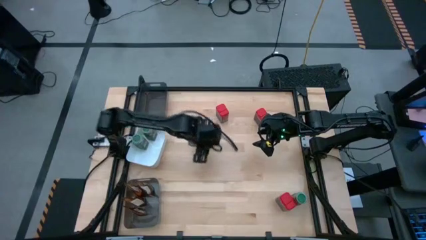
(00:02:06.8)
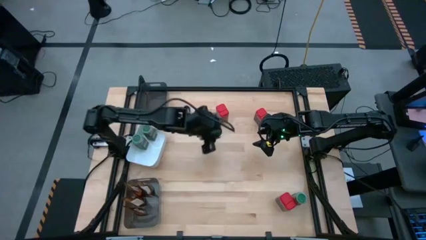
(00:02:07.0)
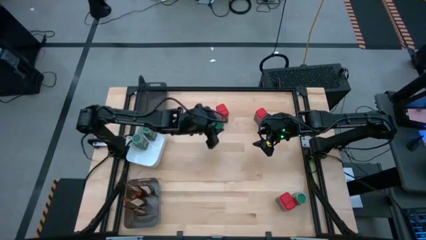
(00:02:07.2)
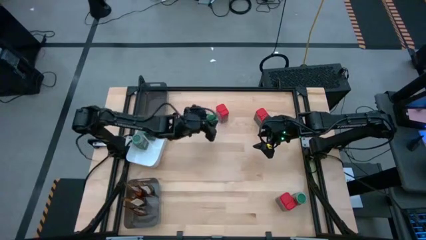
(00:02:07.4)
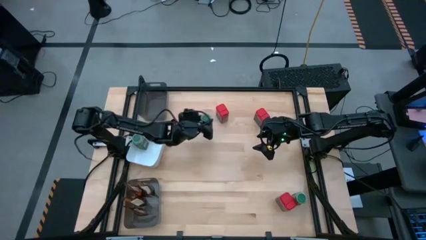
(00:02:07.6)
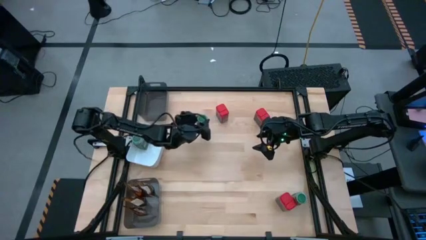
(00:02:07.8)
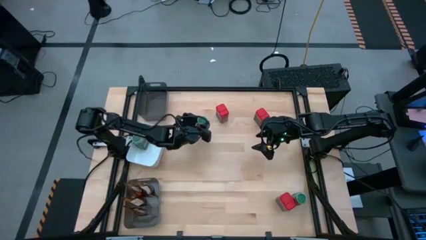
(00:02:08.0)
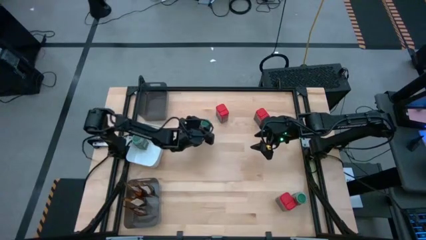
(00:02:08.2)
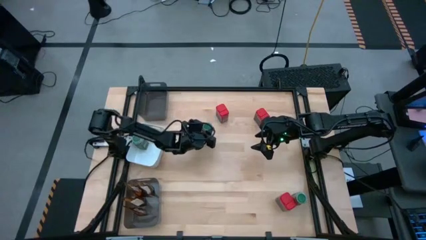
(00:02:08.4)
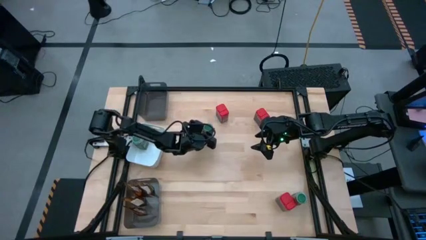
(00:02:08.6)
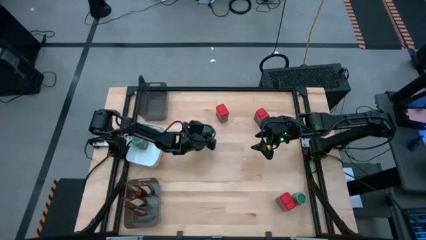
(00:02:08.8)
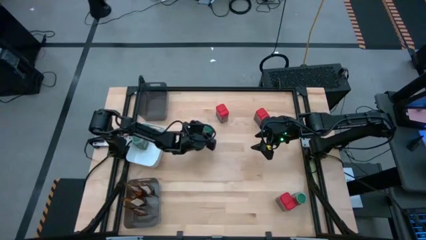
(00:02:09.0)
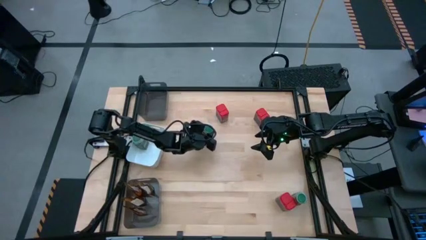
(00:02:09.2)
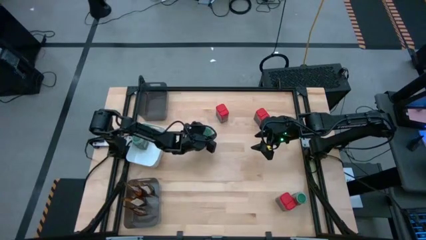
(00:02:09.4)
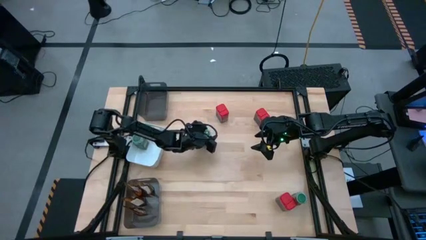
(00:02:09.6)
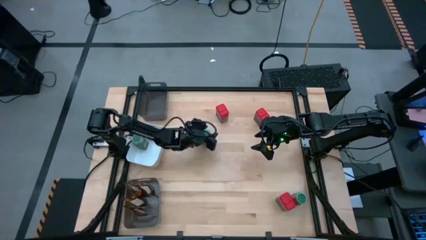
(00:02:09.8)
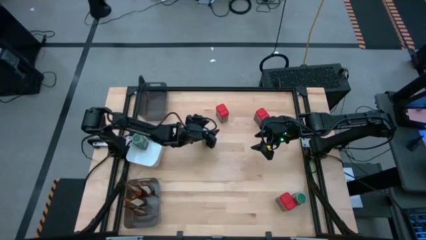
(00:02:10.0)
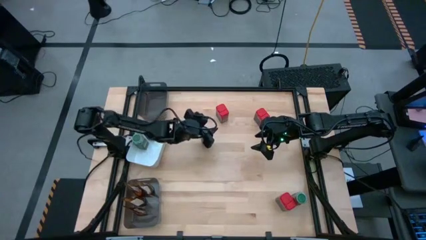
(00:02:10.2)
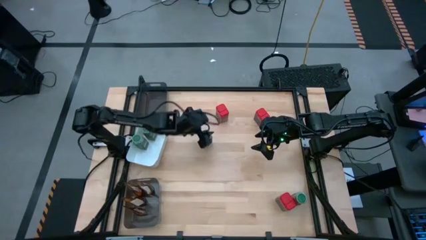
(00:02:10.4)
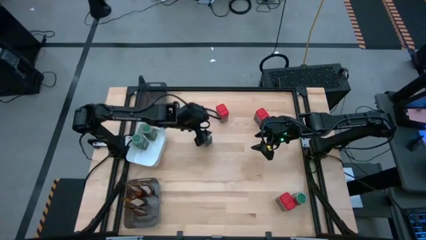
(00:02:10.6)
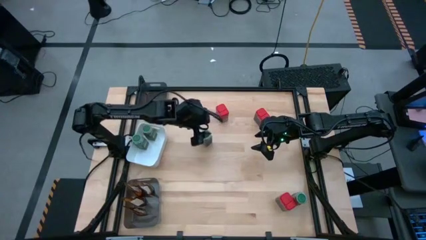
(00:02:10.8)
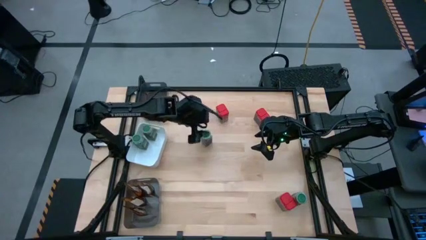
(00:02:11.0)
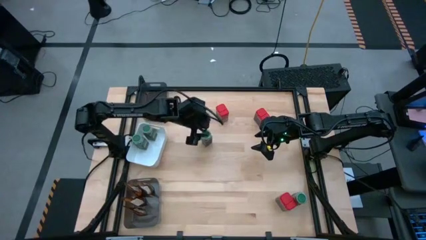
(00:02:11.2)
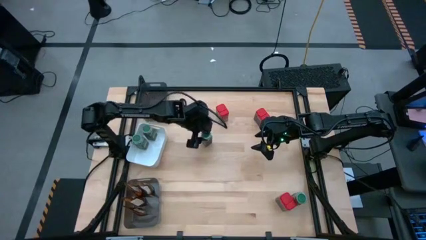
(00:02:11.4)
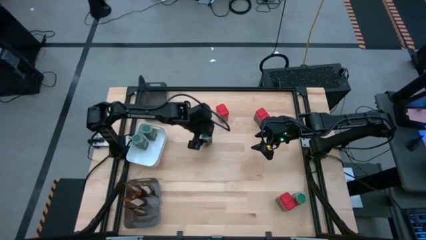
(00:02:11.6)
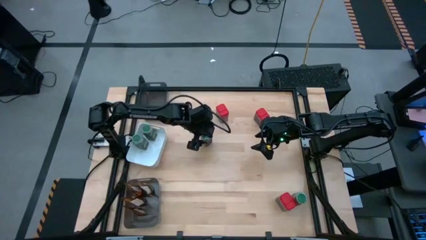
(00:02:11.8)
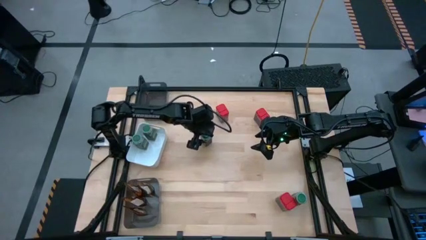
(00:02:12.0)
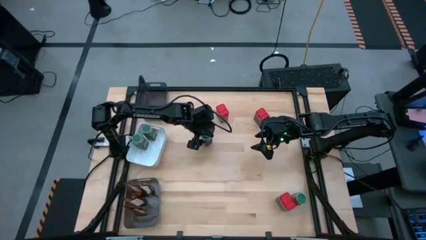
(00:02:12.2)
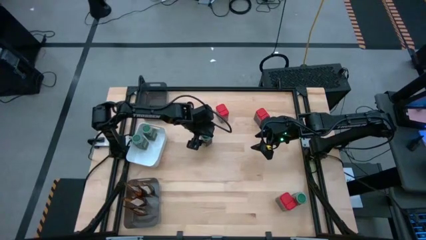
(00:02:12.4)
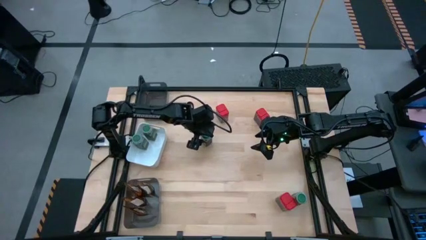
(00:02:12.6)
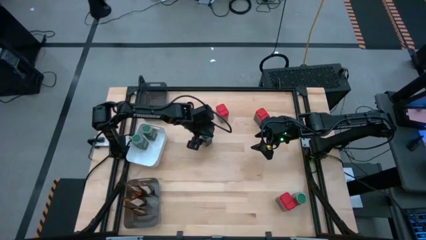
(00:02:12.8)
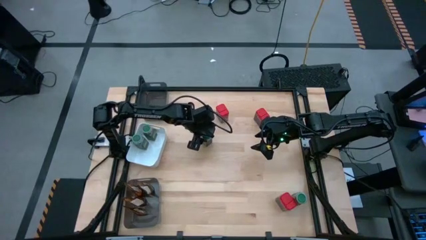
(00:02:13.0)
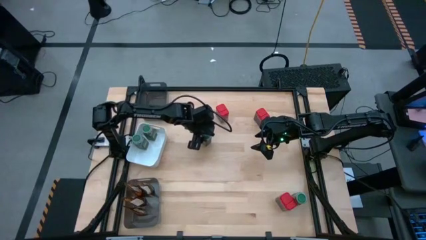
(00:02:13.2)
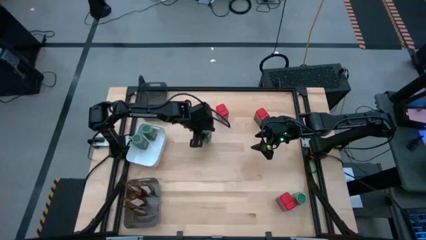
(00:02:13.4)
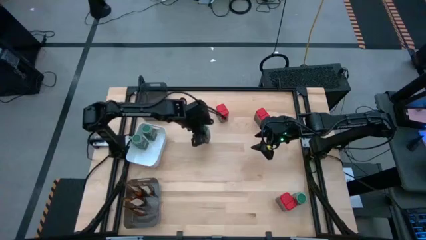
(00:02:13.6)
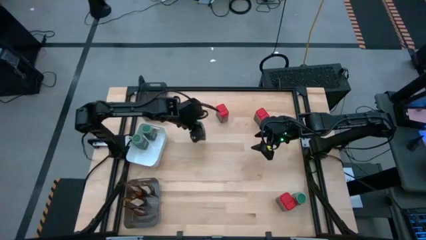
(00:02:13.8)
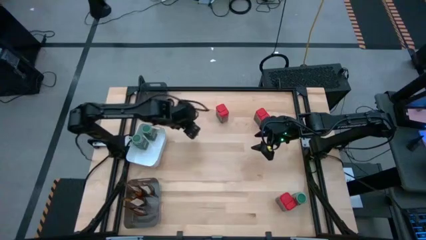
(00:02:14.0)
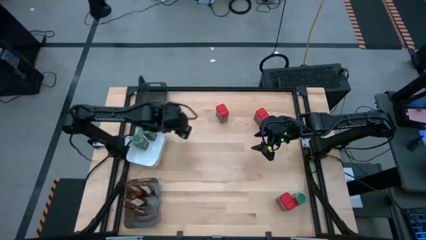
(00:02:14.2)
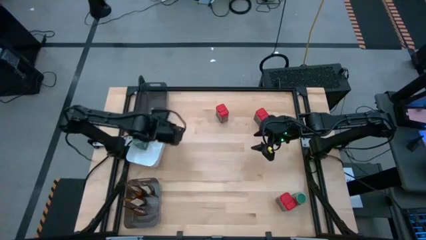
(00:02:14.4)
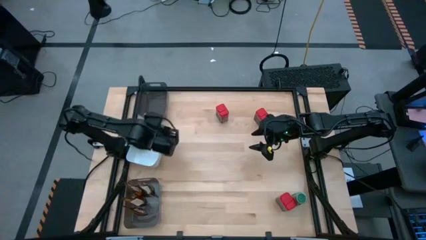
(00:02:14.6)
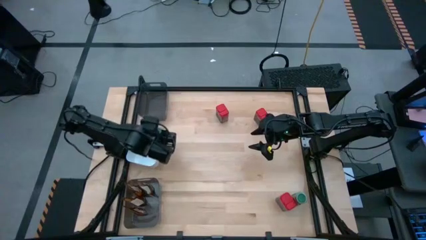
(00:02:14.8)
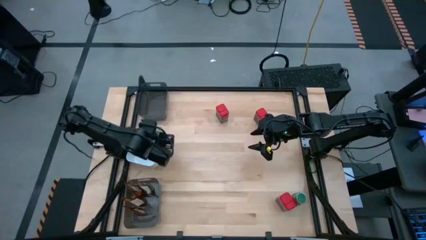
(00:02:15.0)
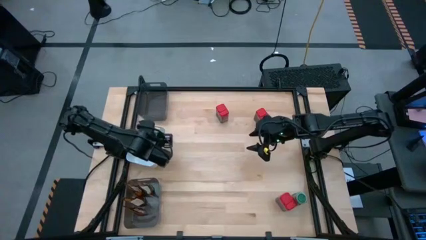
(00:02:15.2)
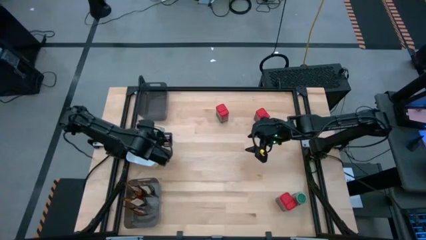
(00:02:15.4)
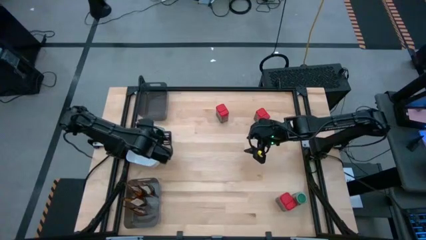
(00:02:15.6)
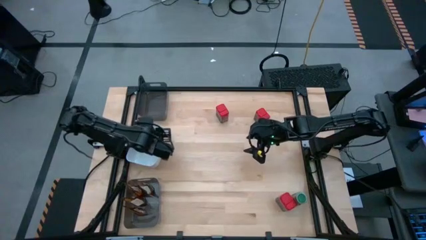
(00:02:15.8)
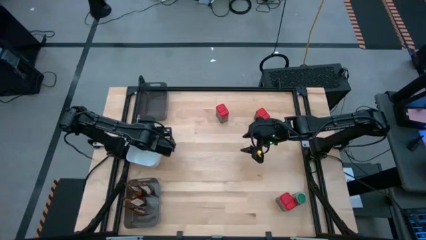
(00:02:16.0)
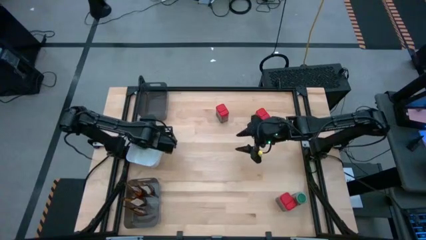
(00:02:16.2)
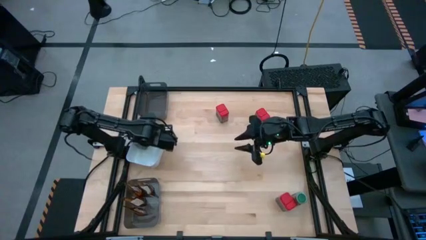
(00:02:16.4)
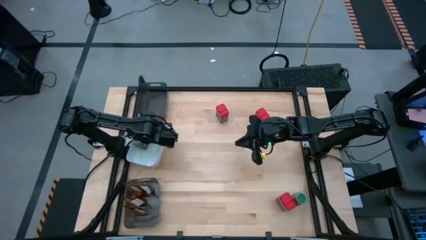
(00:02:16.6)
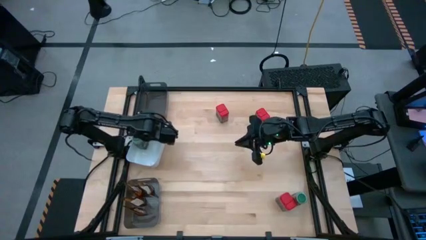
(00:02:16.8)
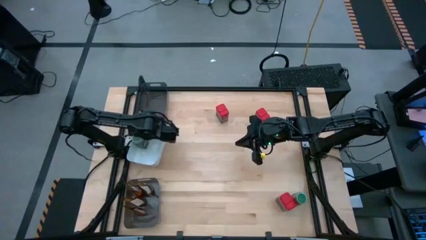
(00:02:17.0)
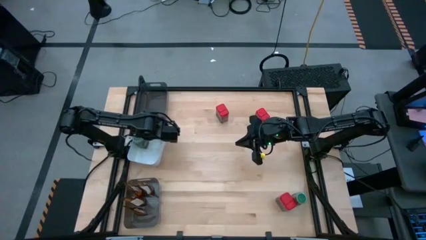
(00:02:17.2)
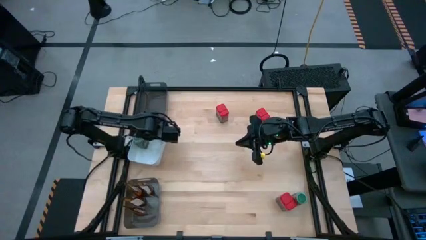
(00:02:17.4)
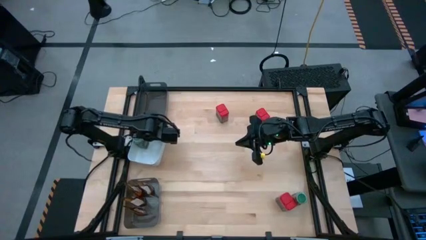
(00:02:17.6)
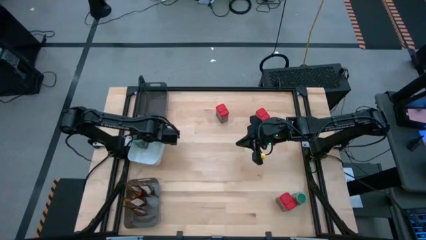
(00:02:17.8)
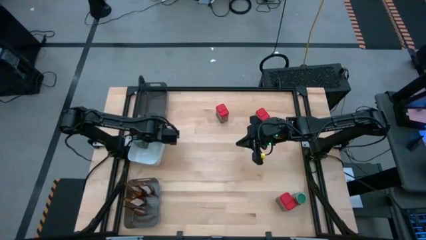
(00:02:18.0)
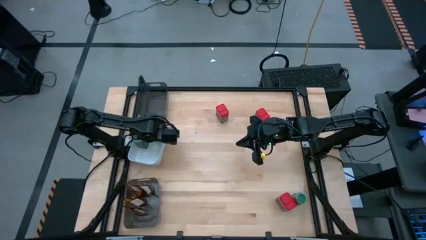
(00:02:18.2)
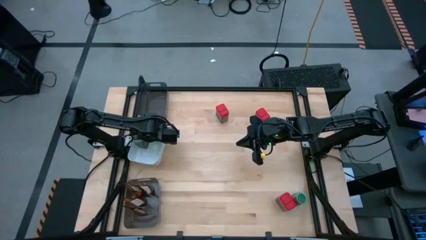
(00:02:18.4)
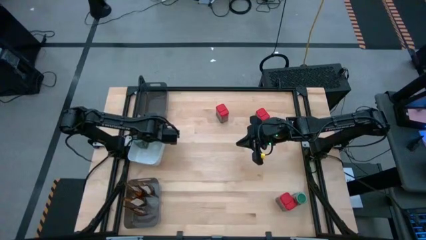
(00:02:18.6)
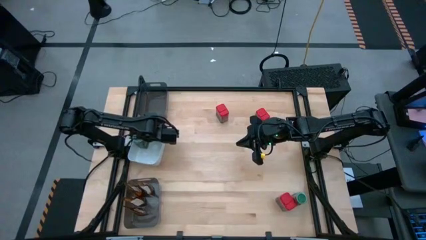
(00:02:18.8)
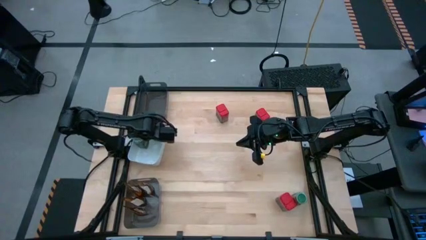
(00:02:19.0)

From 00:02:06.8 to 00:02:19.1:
Task: Sort spices by type
Put the green seasoning bottle into the white bin

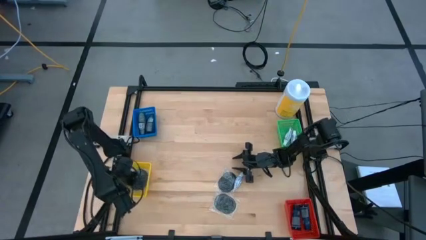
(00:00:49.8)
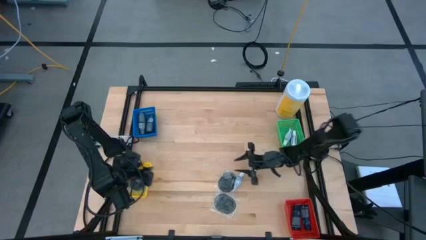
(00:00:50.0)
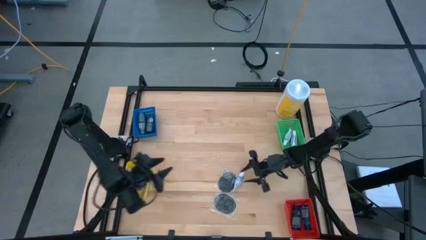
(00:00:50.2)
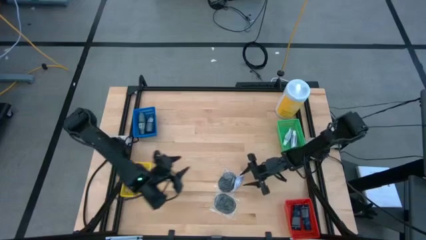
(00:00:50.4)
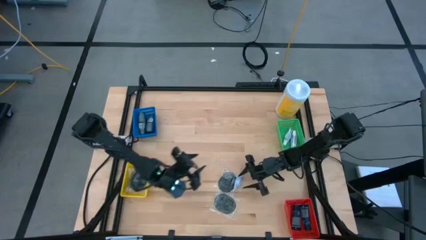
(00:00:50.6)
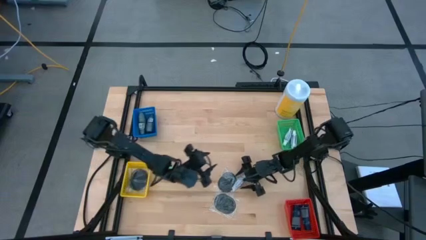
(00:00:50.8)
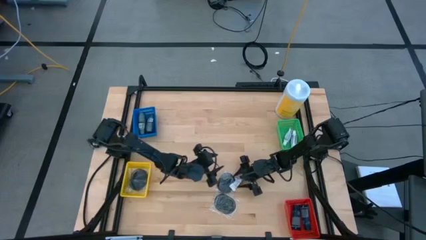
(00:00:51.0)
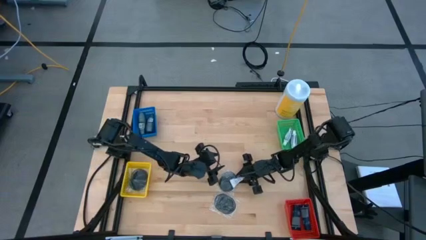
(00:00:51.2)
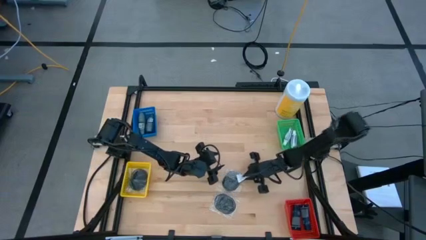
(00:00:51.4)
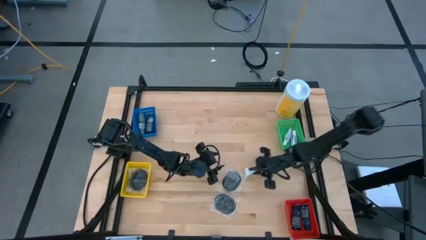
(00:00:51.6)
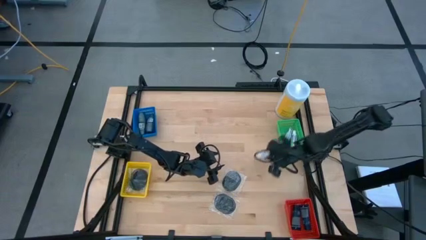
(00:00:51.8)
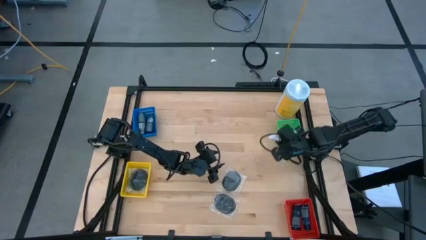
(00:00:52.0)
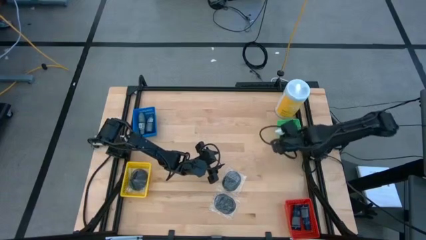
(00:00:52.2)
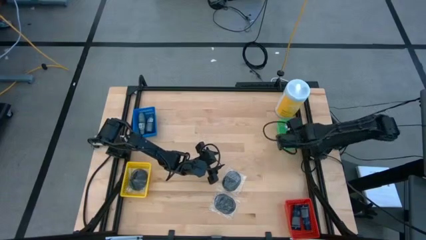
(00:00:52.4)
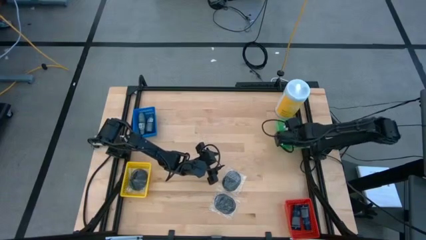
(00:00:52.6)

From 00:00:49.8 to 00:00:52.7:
Task: Pick & Place Travel size toiletries
Put the white toothpaste into the green bin
